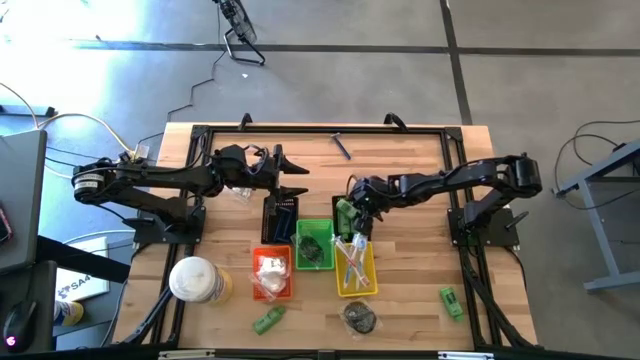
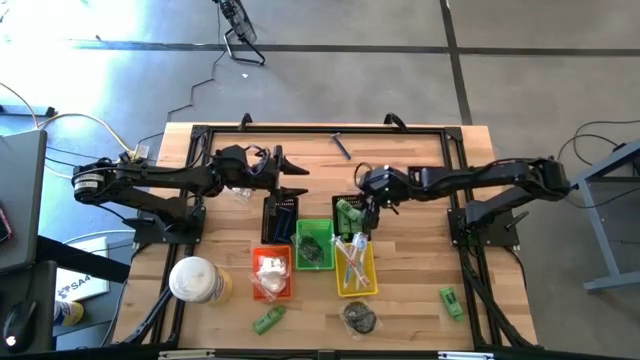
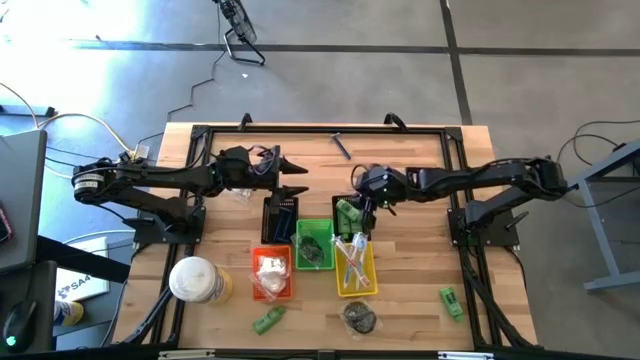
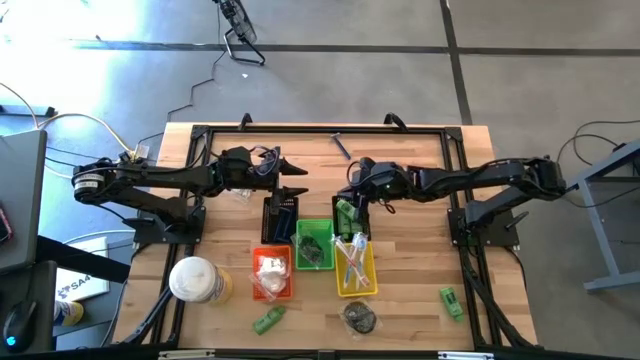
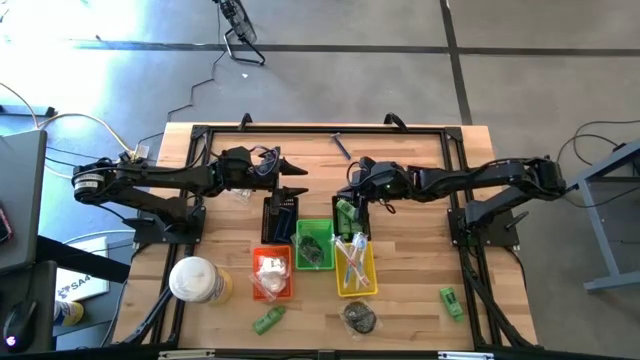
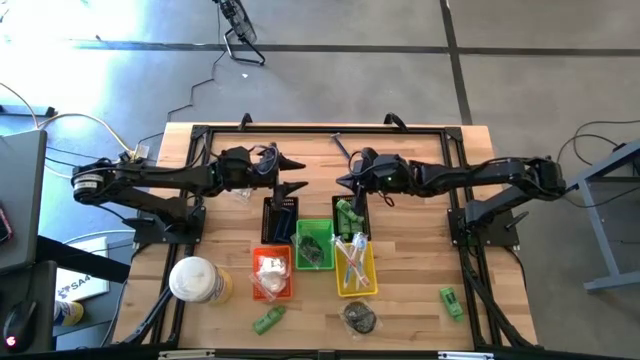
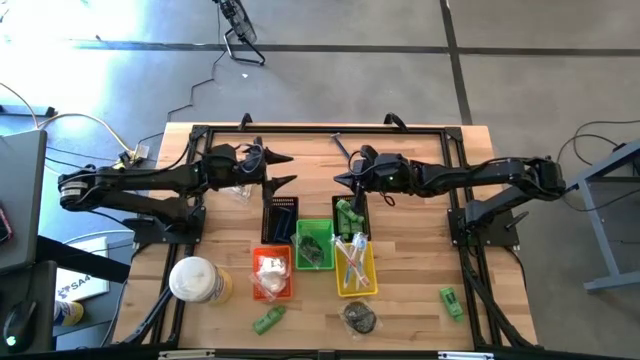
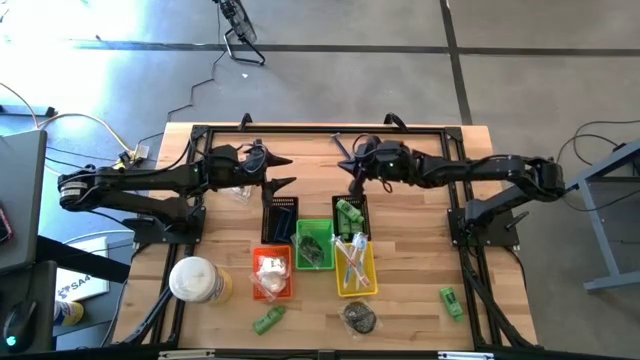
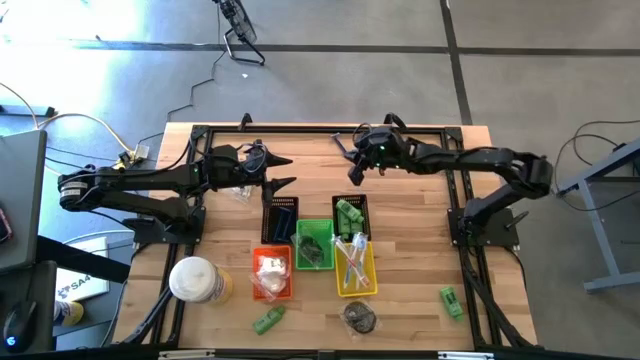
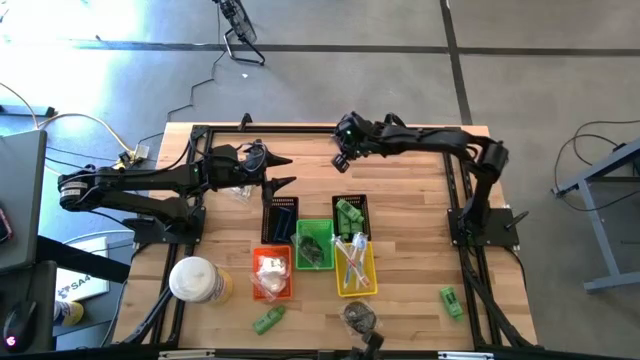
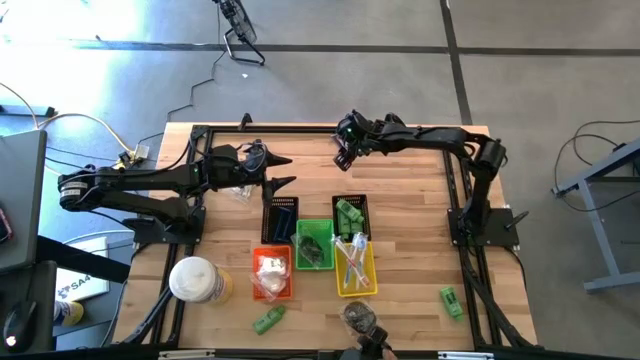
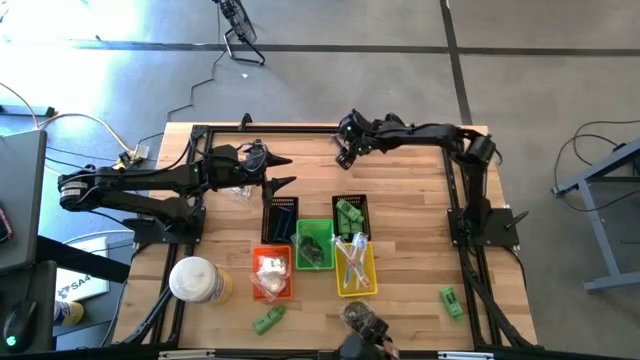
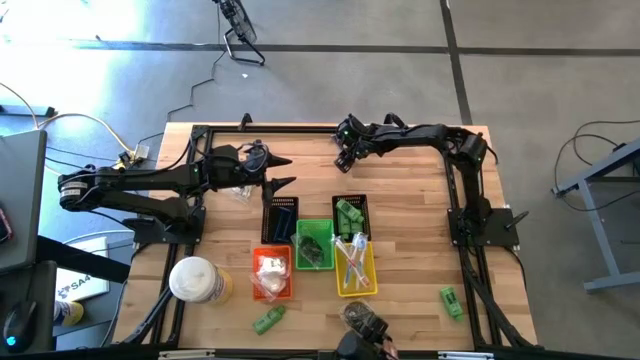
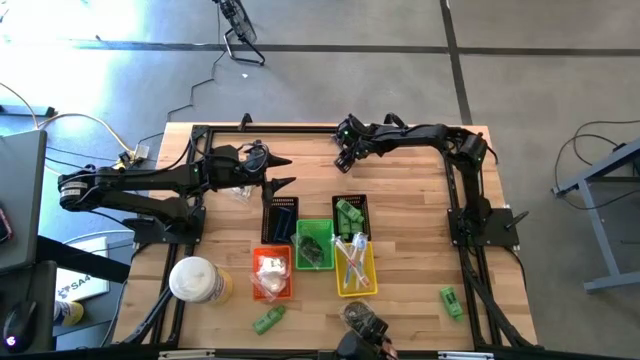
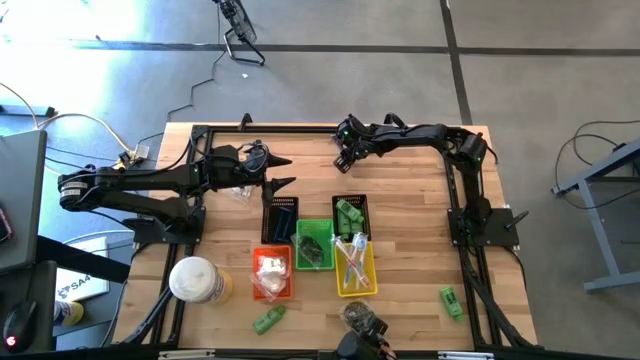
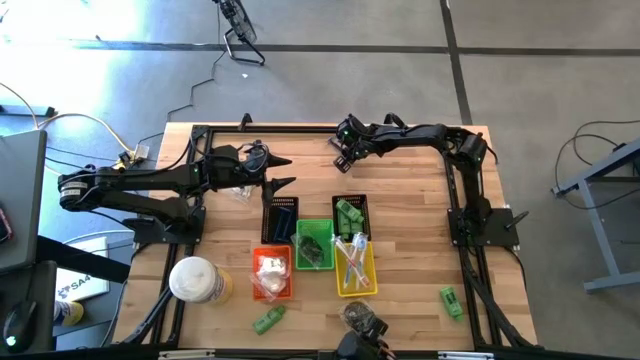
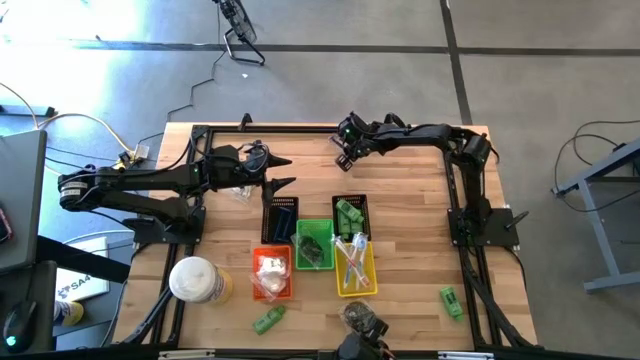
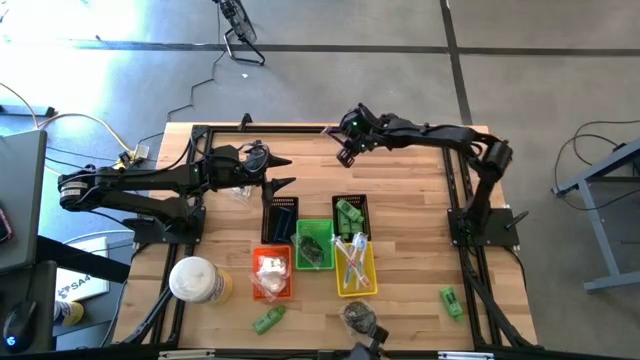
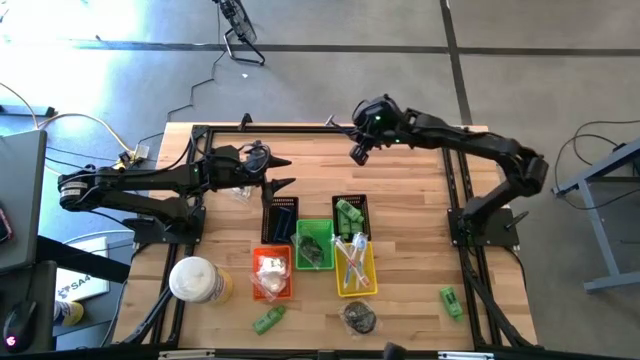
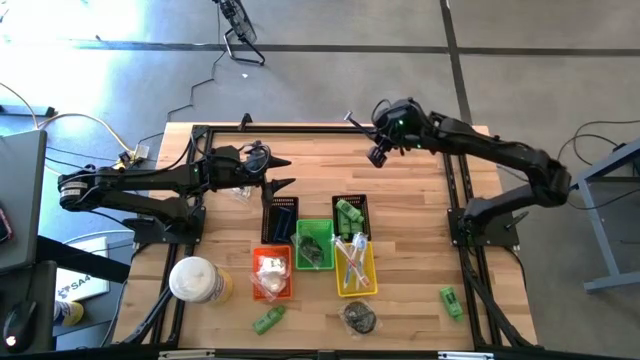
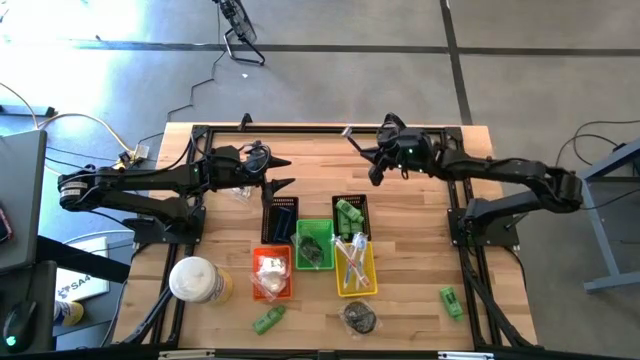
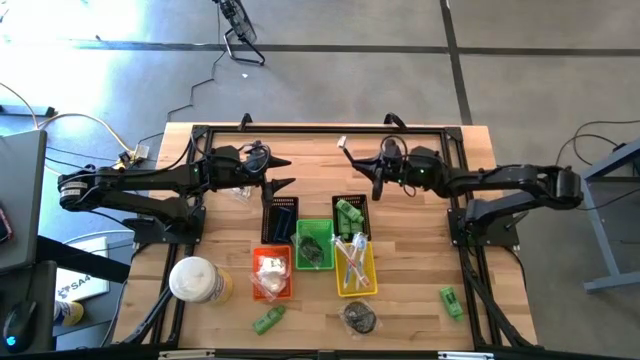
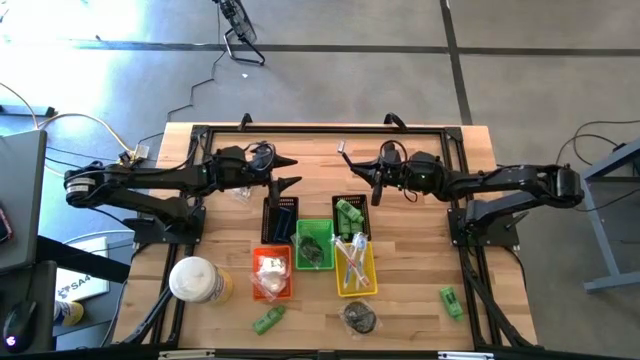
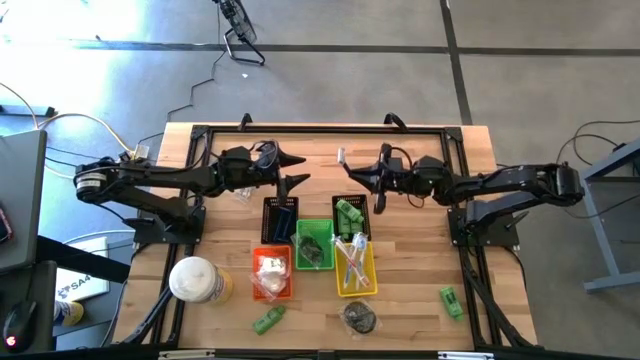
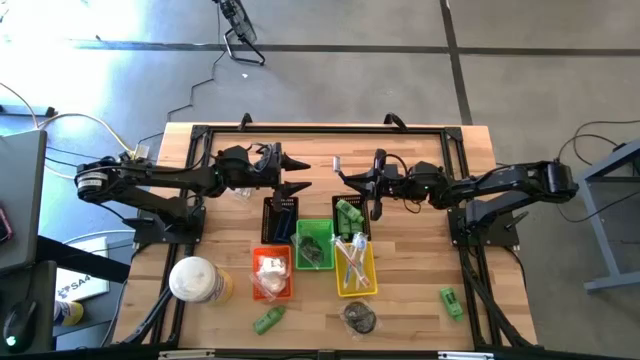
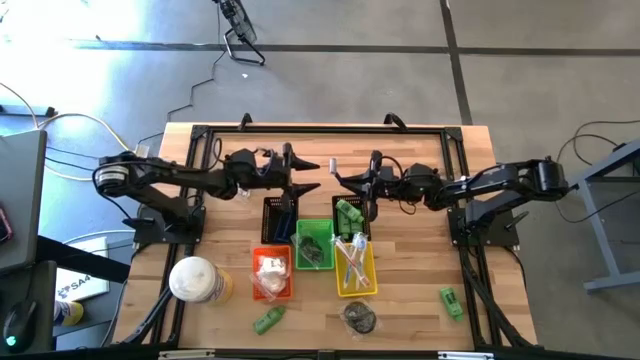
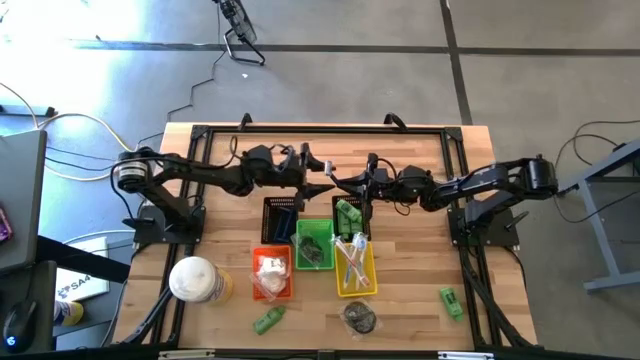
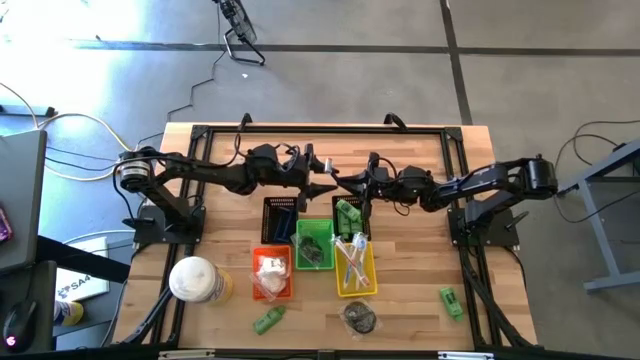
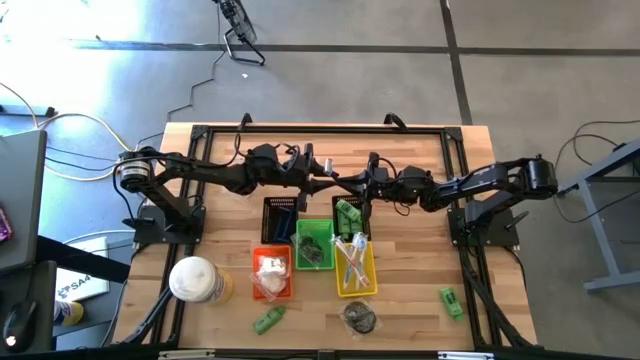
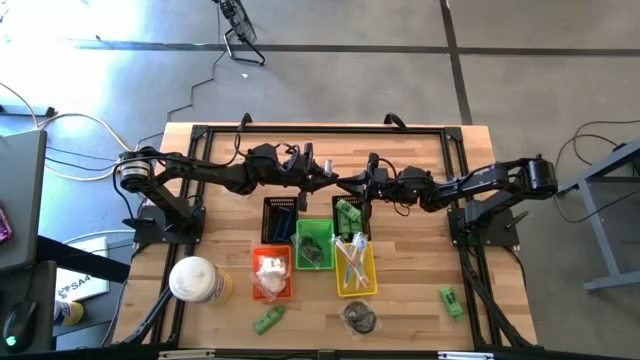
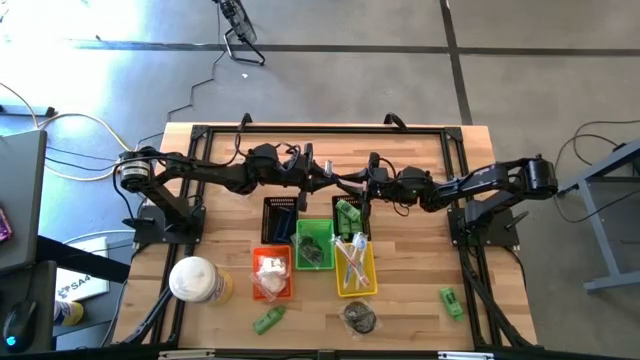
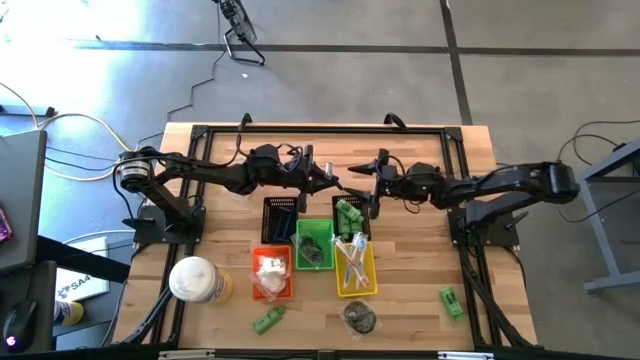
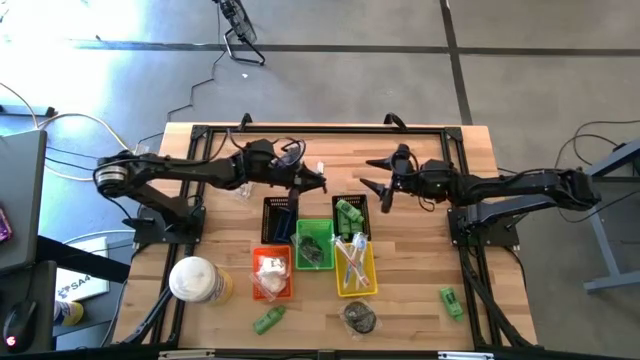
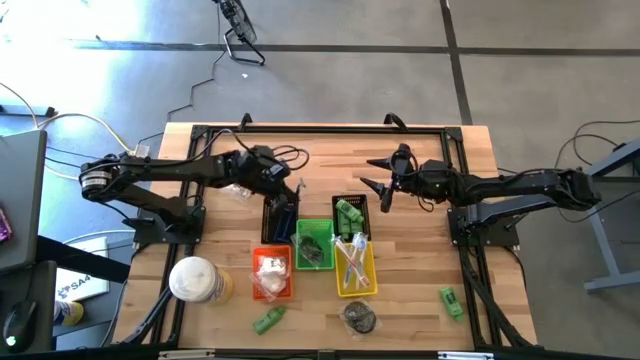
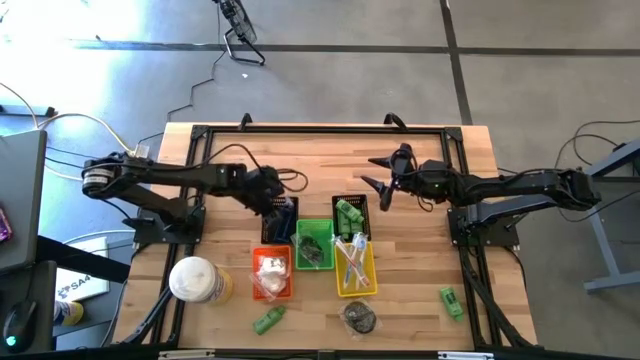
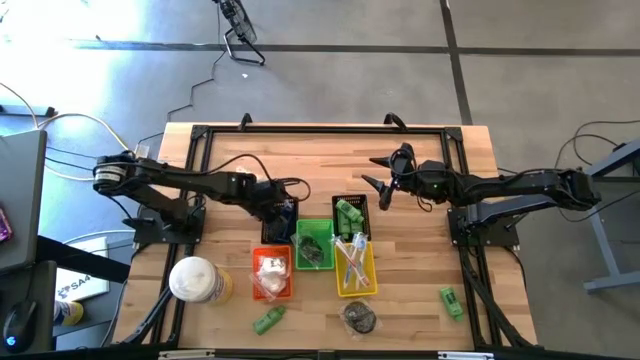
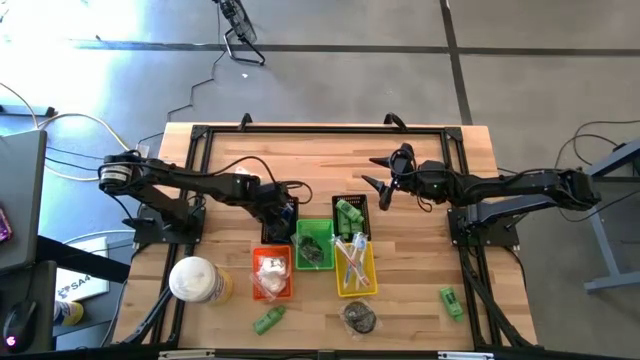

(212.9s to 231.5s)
Task: Pick & Place Travel size toiletries
Put the blue razor into the left black bin
